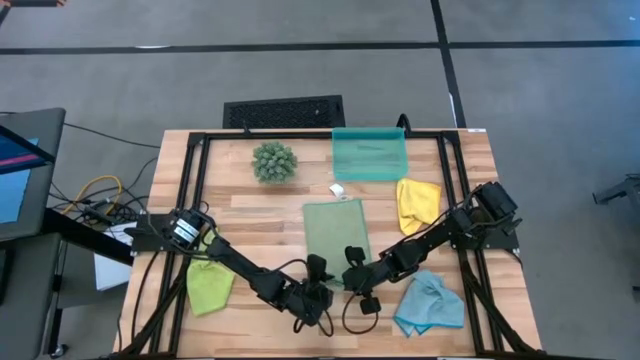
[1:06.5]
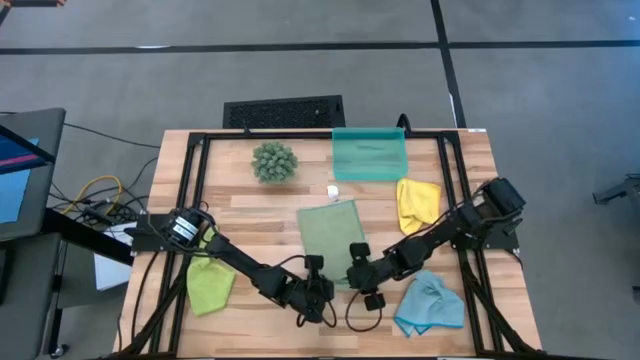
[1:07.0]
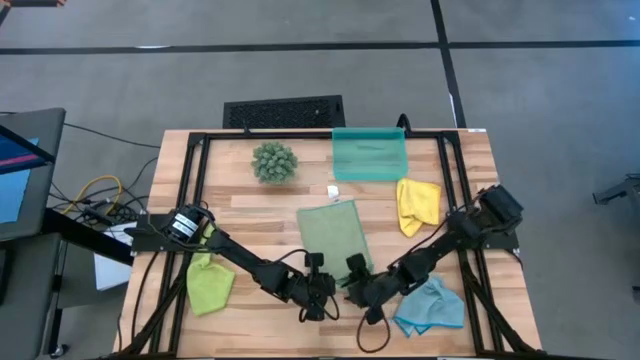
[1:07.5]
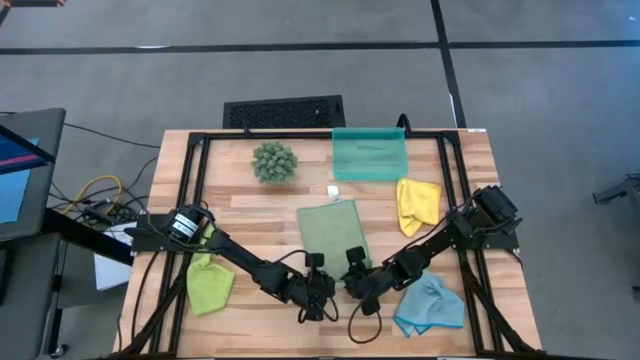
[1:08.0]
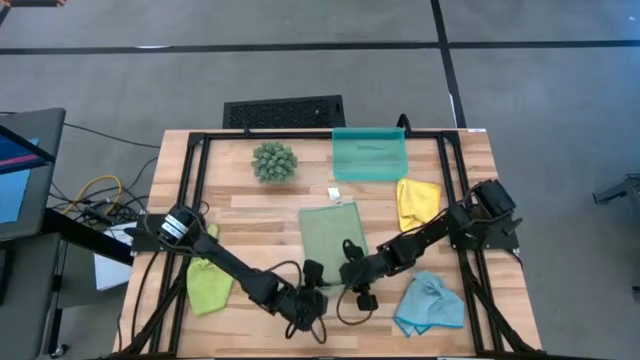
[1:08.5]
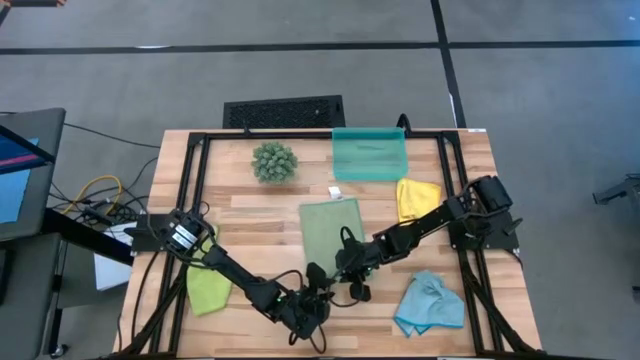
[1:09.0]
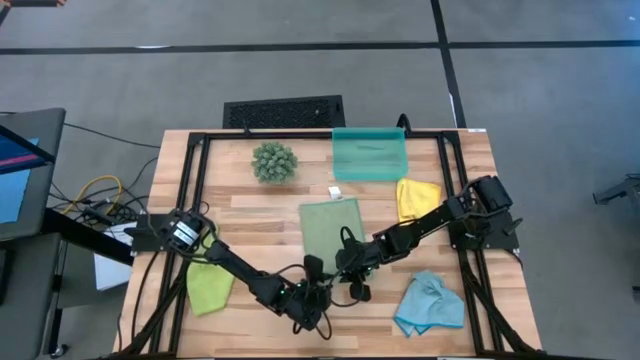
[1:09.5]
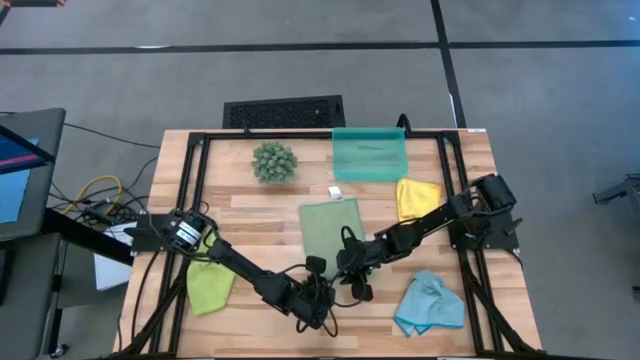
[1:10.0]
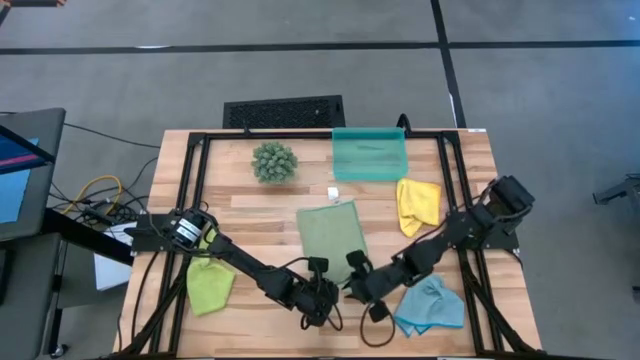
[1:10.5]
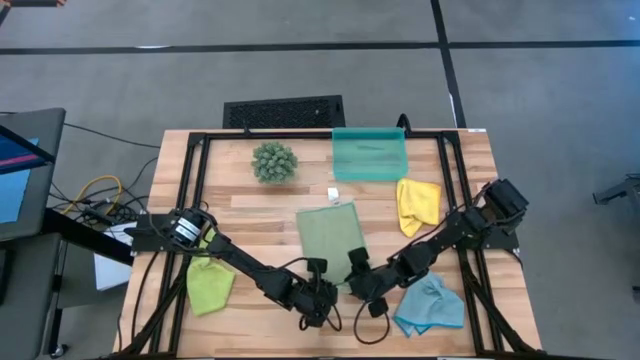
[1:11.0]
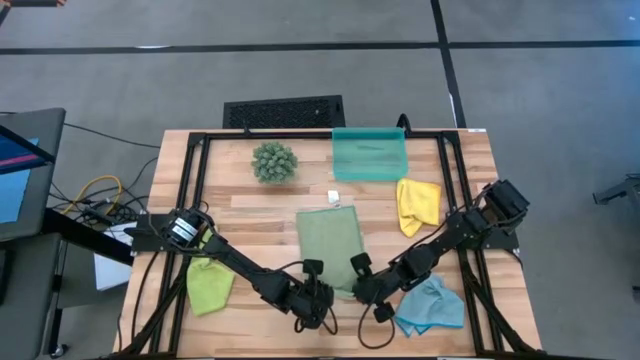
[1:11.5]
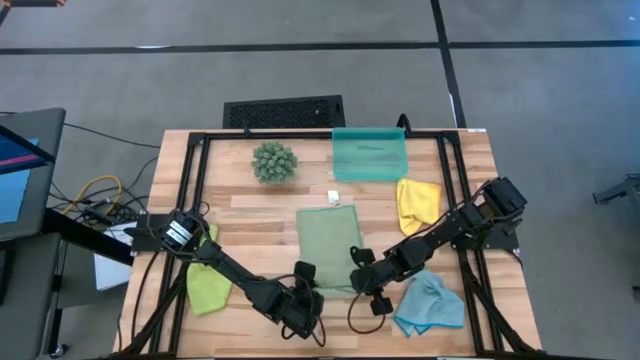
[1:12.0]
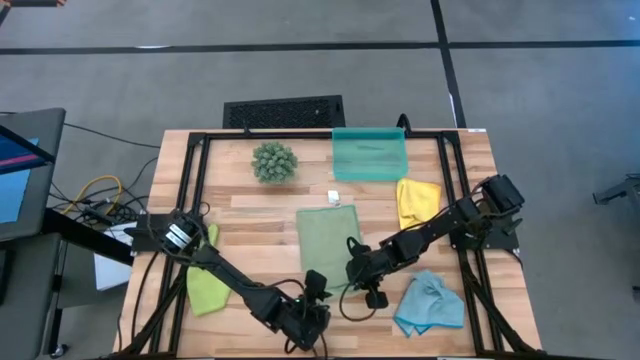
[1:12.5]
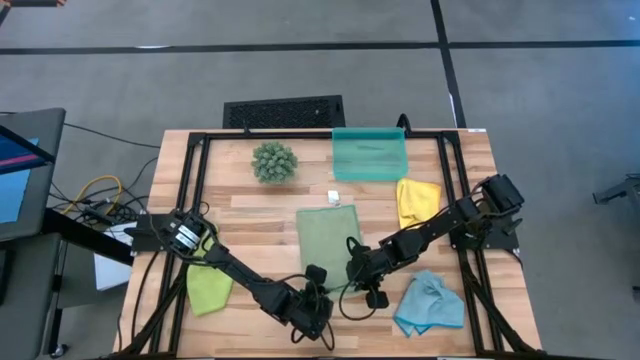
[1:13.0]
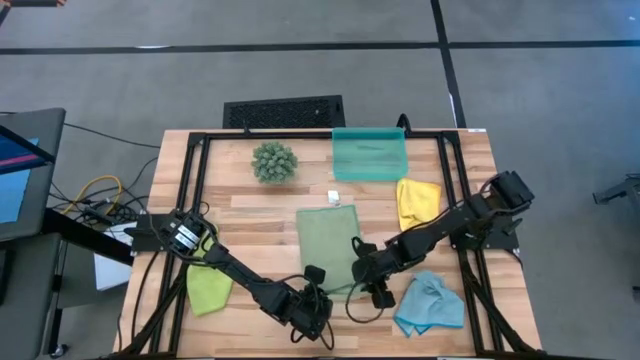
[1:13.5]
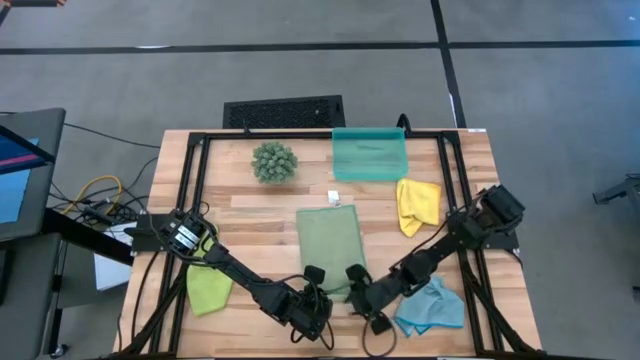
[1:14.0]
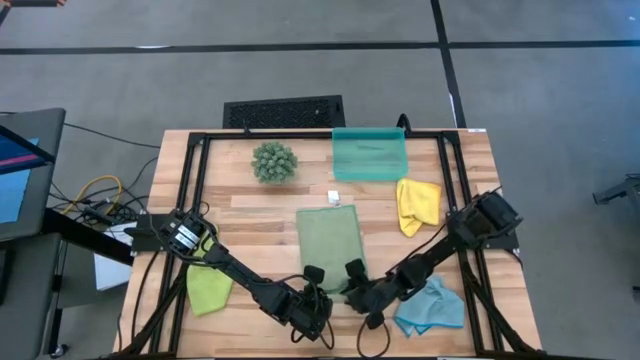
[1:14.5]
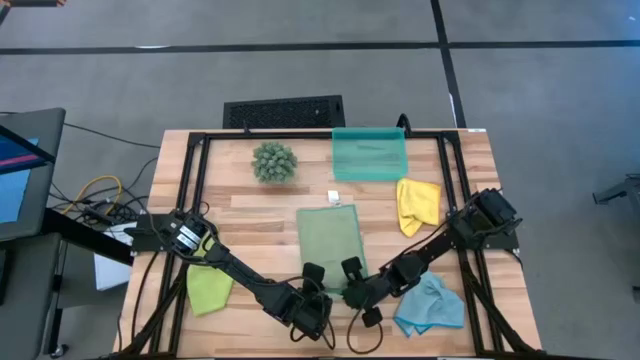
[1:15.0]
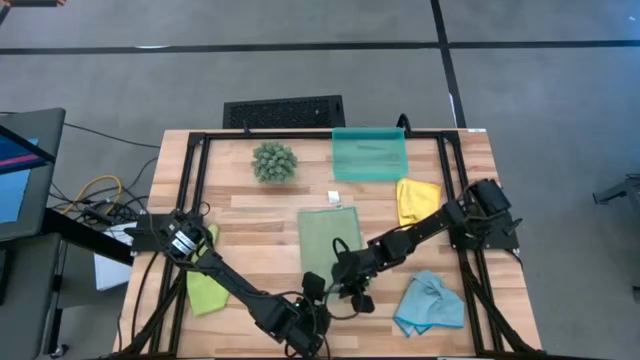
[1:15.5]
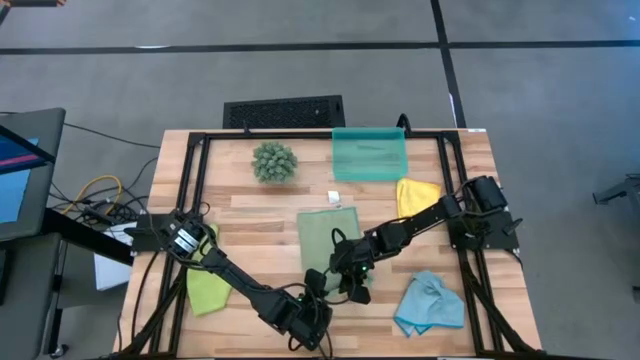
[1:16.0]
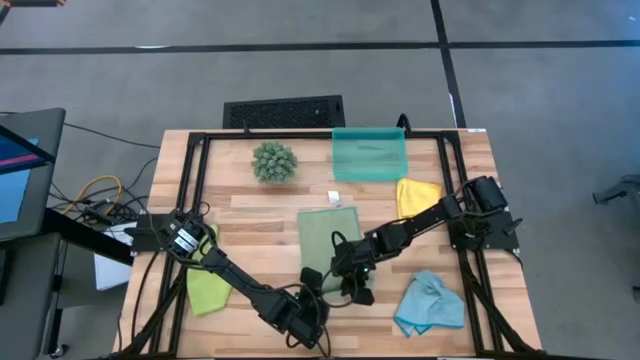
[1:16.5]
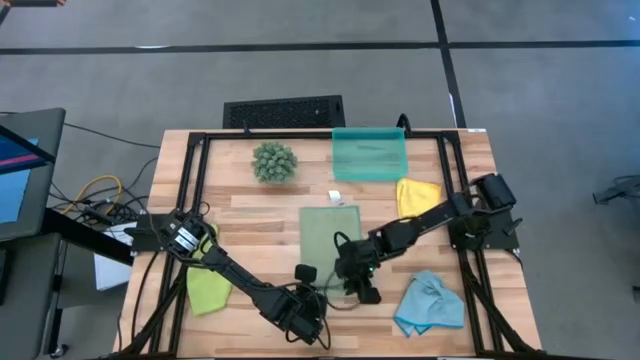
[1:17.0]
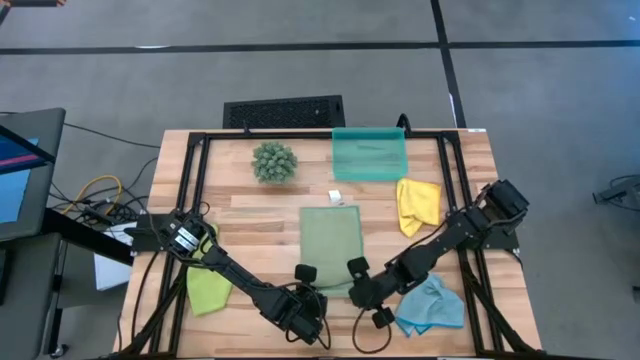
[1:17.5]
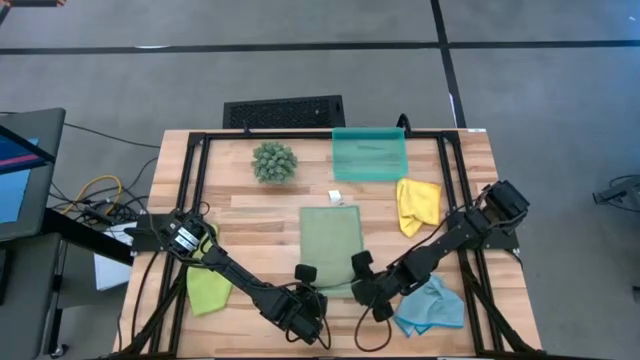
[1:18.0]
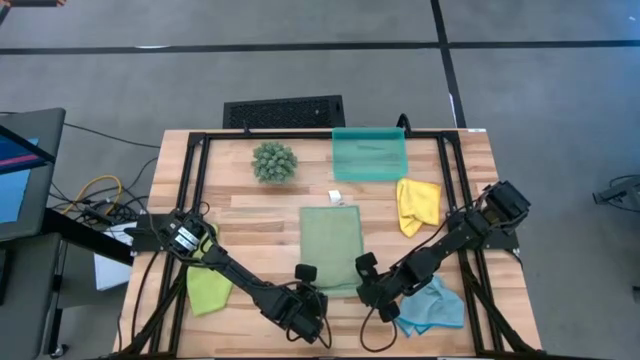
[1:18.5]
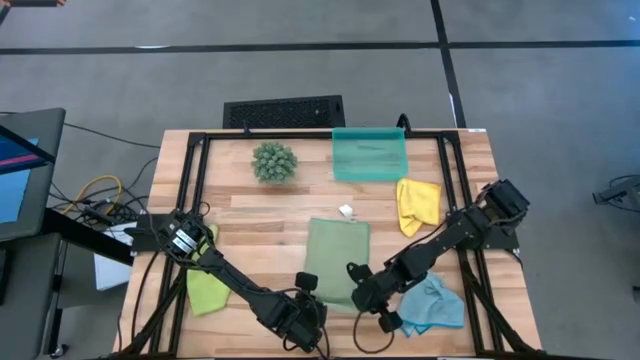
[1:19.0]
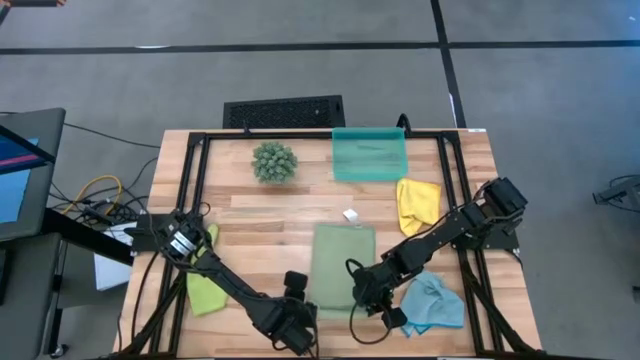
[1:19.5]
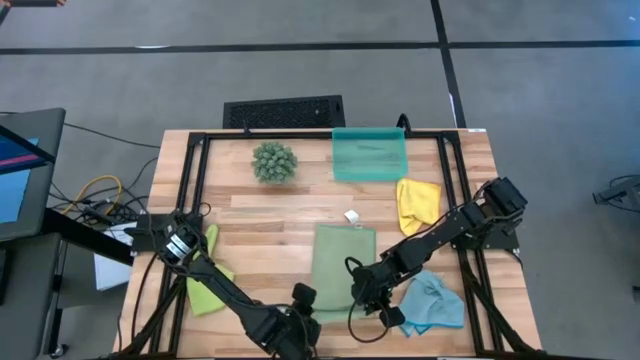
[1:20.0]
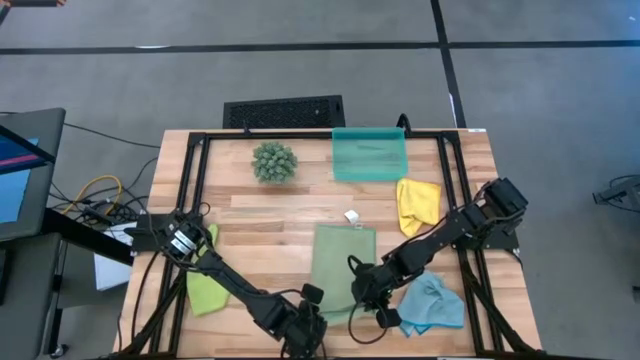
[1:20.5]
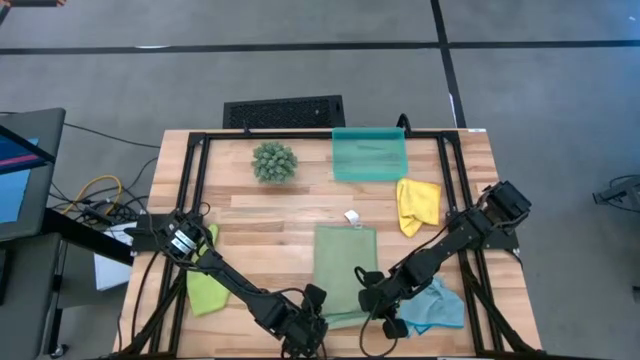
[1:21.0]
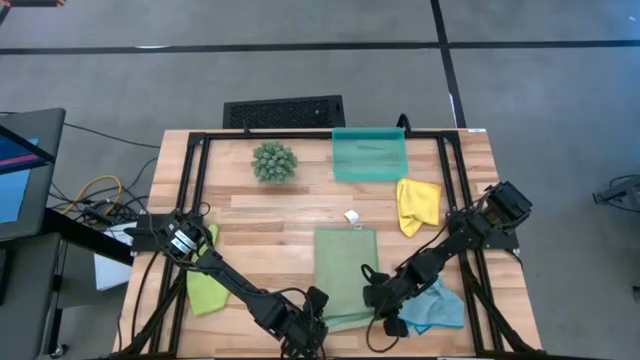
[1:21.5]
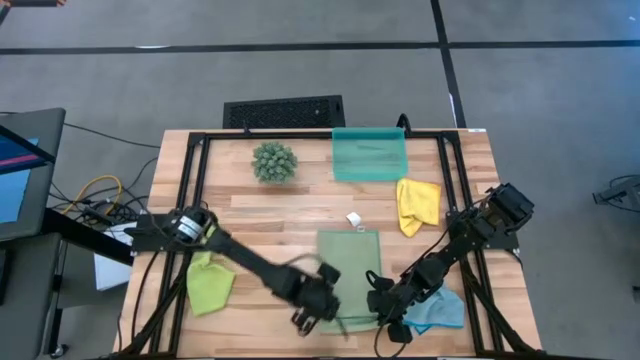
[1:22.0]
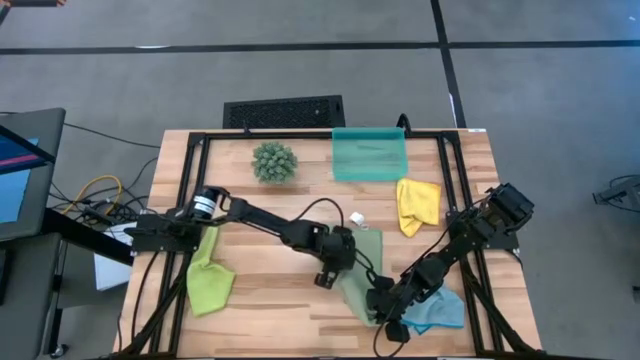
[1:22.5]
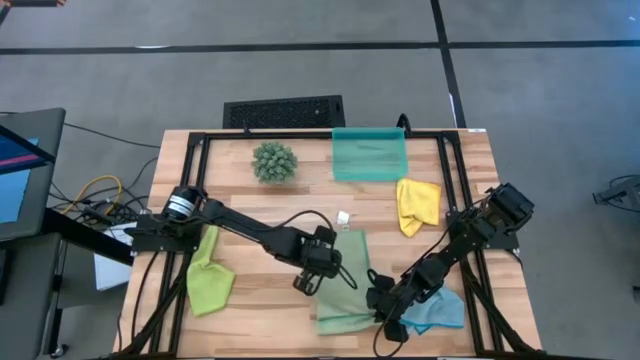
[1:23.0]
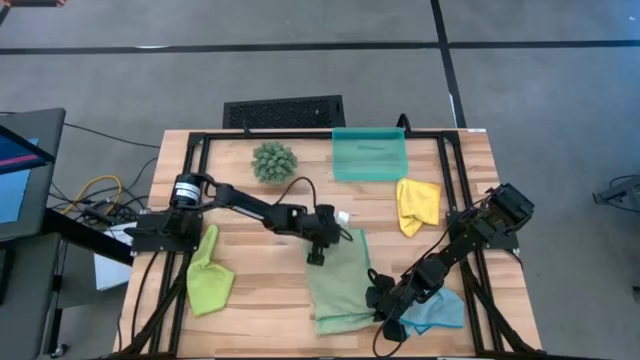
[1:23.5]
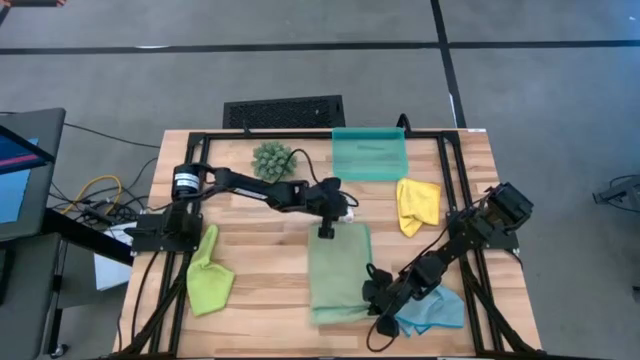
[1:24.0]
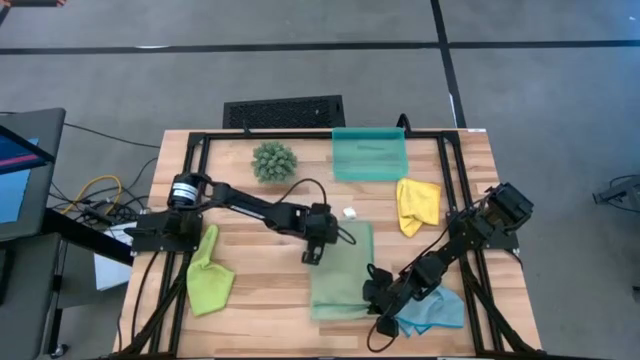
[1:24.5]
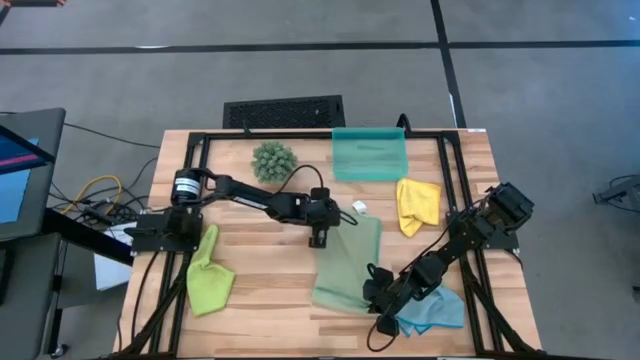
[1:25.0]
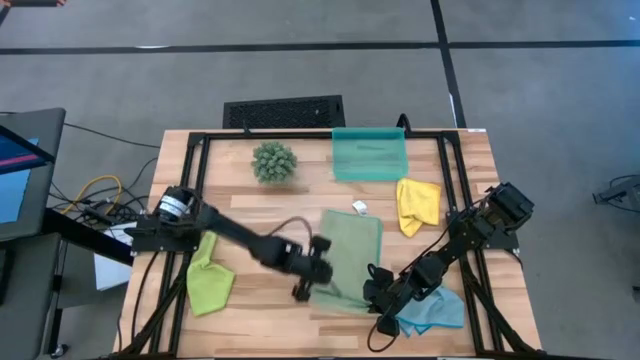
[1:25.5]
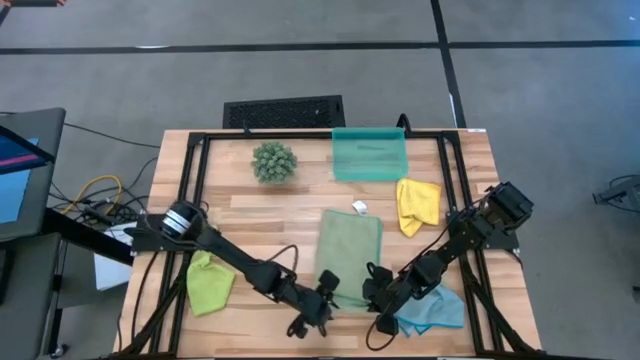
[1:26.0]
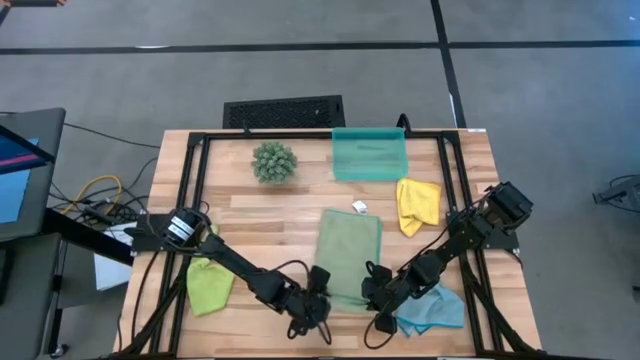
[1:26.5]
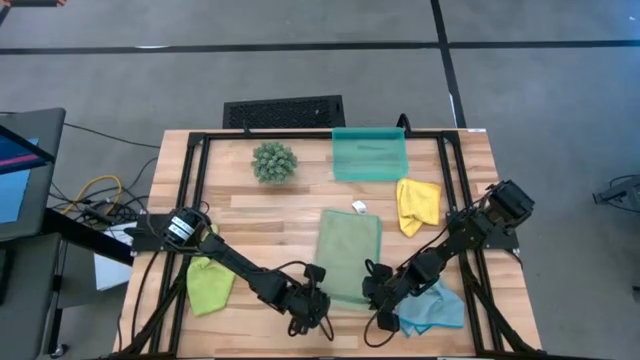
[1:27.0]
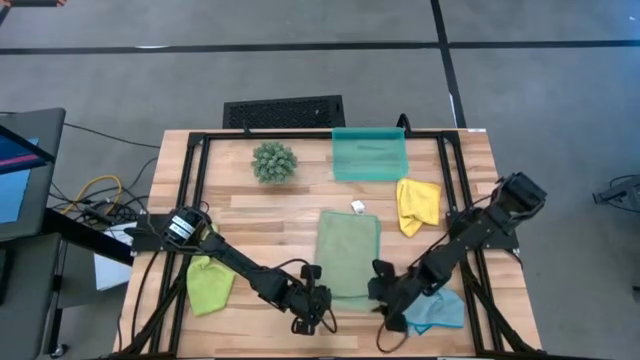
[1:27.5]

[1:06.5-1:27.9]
Task: Roll microfiber towels into tight, uniform cylinder then place into a basket
Roll the dark green microfiber cloth
